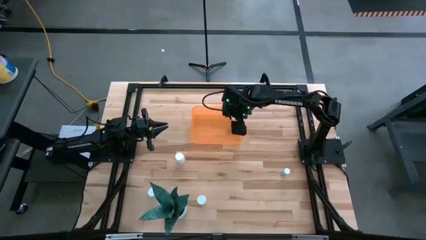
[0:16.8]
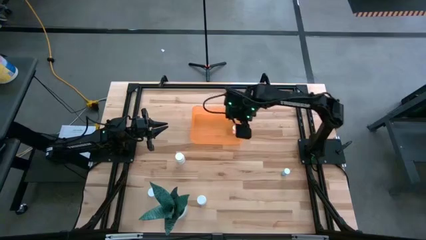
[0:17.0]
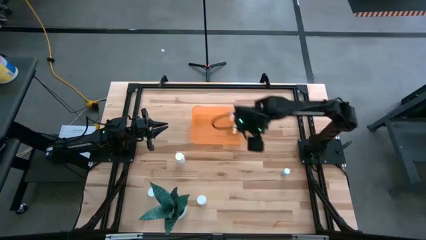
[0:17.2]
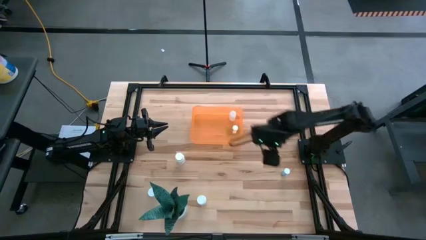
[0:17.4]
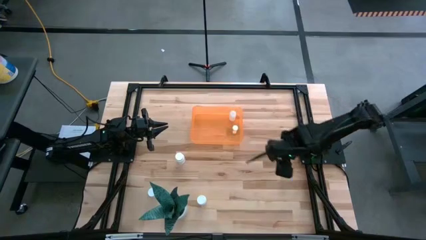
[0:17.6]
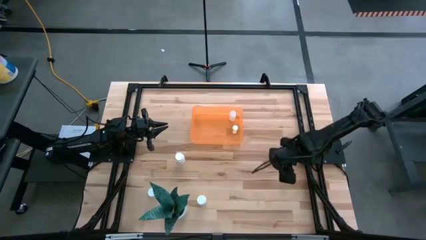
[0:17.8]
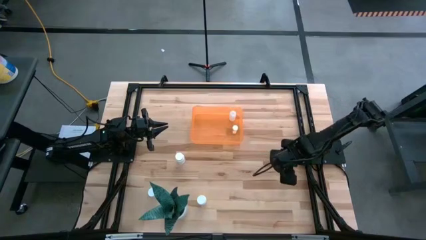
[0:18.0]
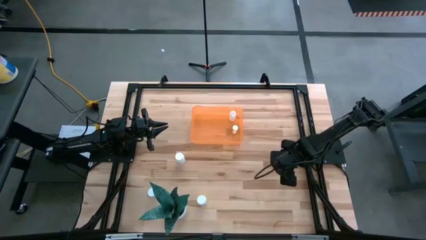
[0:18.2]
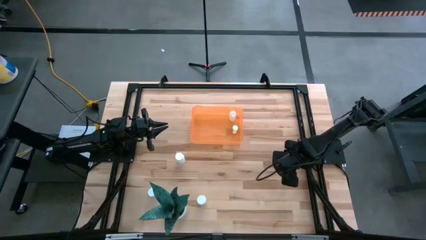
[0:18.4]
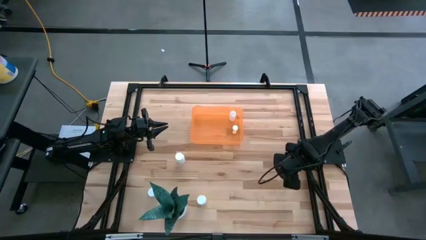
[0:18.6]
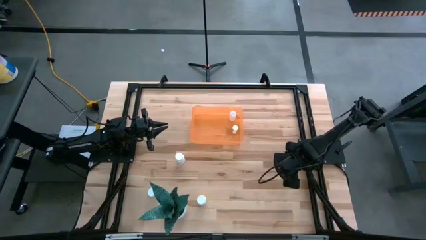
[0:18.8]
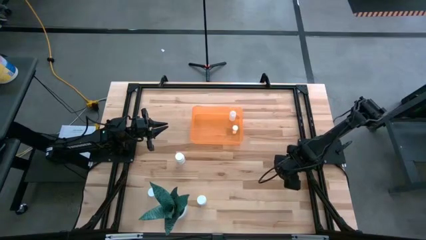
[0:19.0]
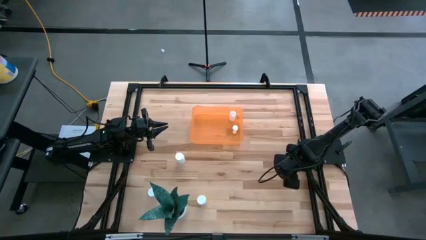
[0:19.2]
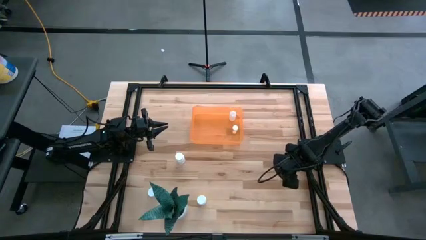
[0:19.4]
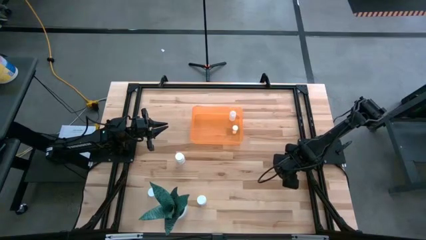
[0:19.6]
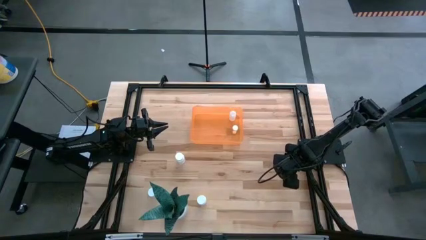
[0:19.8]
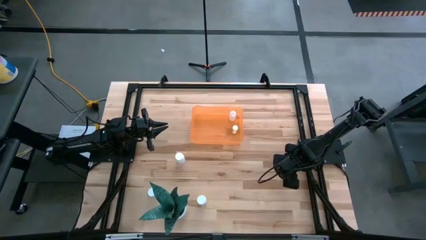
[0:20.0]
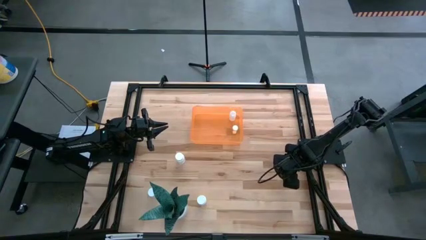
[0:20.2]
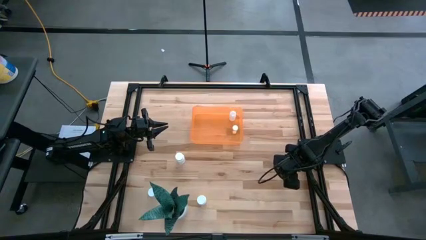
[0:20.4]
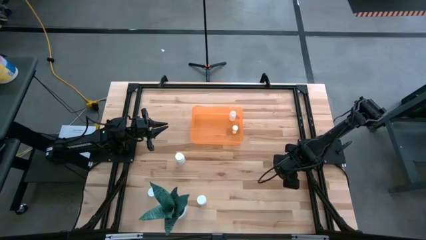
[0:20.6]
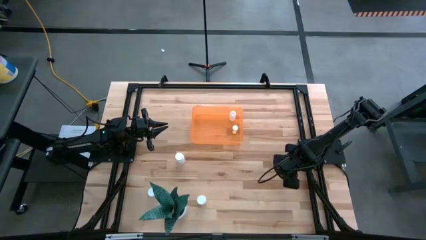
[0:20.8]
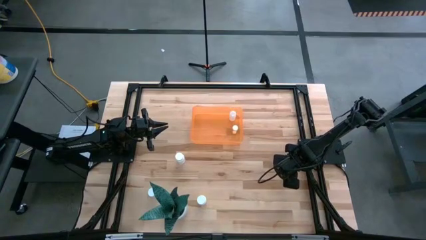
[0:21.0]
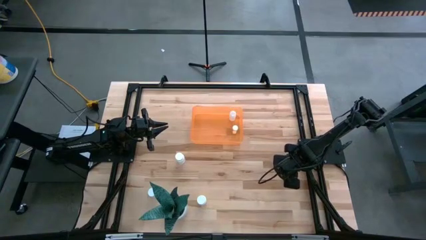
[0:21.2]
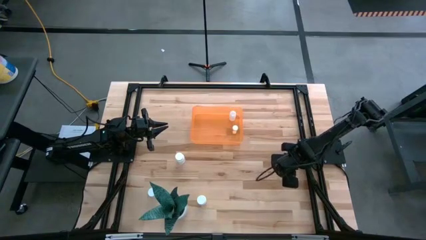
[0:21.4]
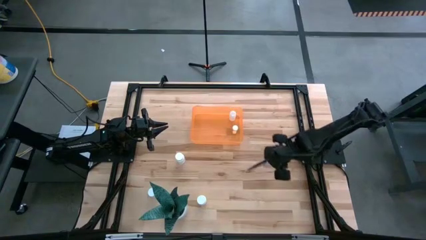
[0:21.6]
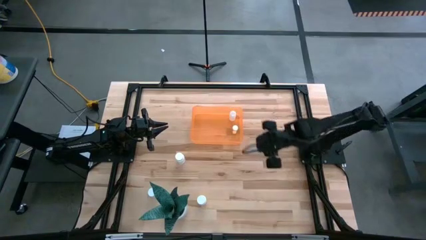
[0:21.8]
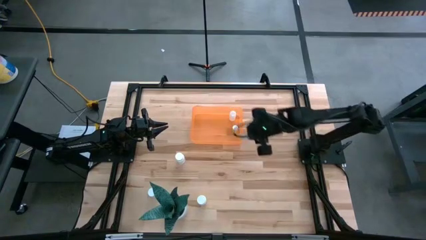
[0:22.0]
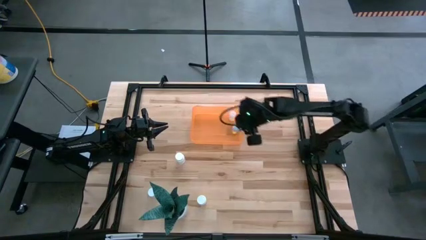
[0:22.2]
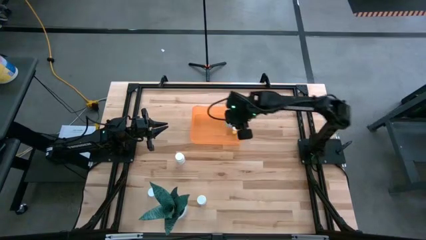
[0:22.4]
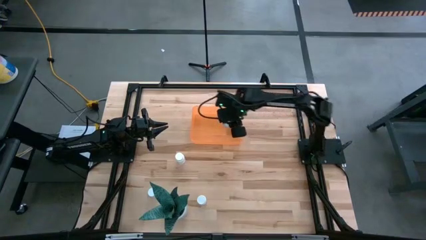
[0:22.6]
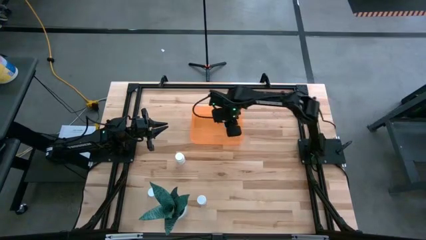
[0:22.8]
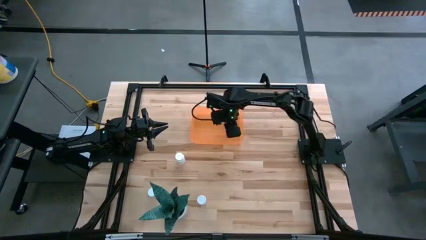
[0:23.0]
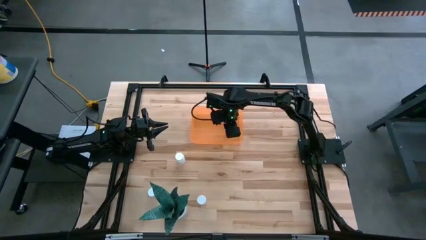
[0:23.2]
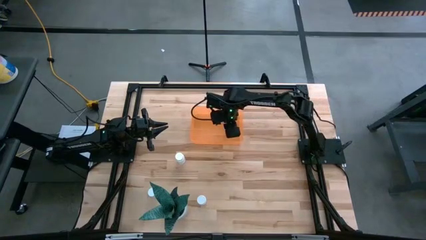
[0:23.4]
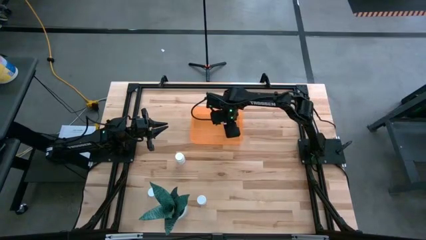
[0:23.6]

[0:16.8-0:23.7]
Task: Pick and place pill bottles into a basket
Put the blue pill bottle in the orange bin

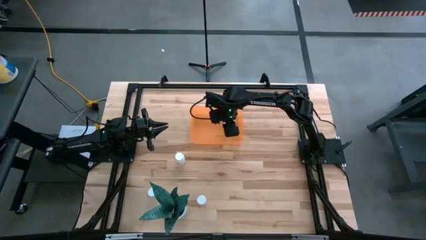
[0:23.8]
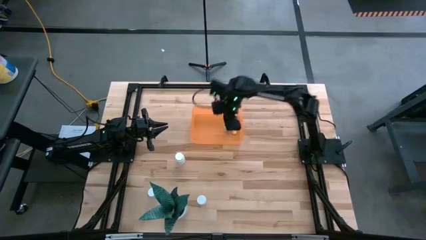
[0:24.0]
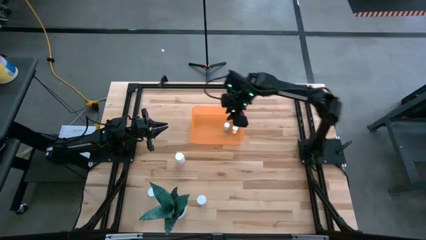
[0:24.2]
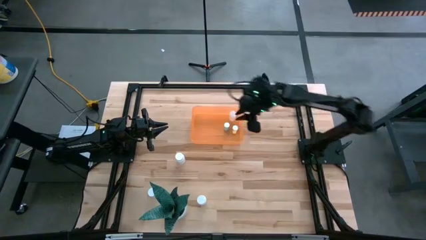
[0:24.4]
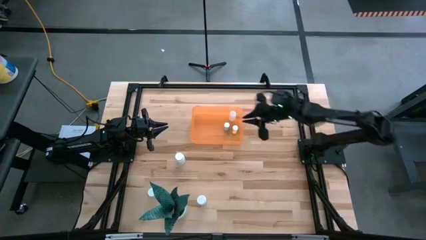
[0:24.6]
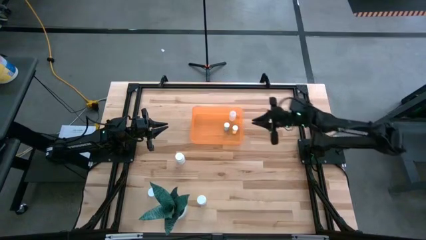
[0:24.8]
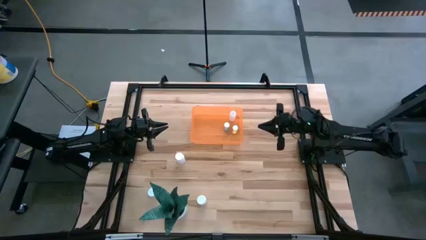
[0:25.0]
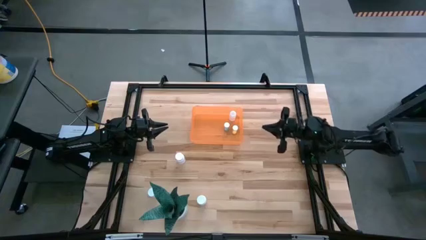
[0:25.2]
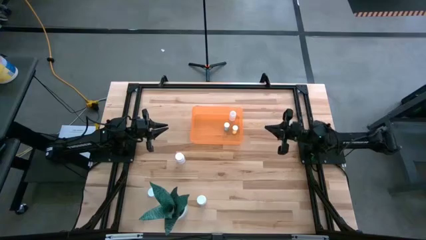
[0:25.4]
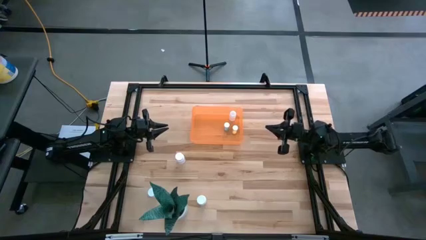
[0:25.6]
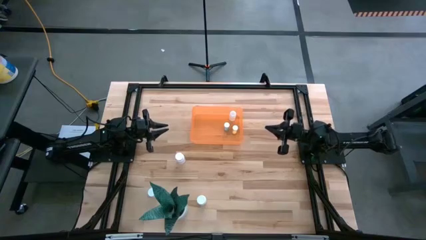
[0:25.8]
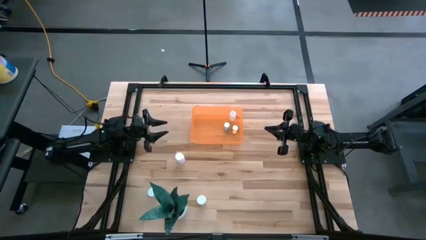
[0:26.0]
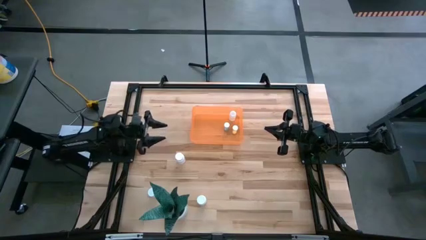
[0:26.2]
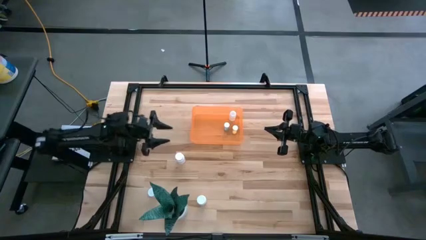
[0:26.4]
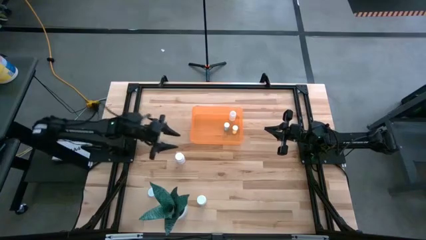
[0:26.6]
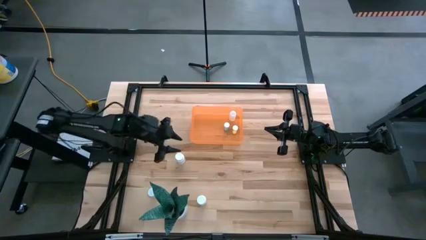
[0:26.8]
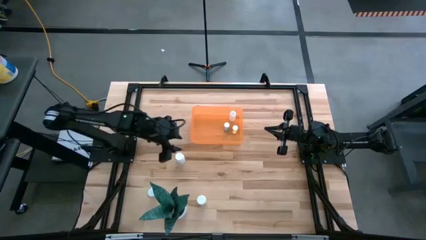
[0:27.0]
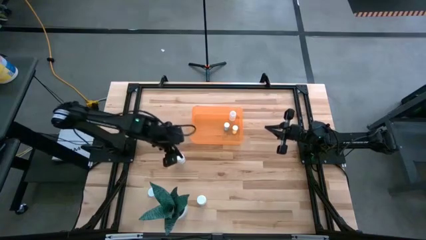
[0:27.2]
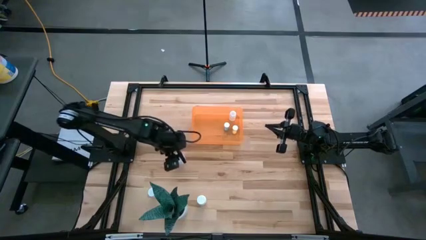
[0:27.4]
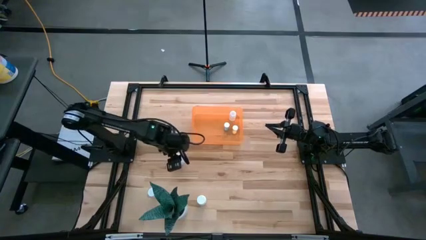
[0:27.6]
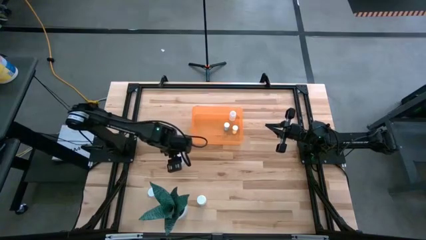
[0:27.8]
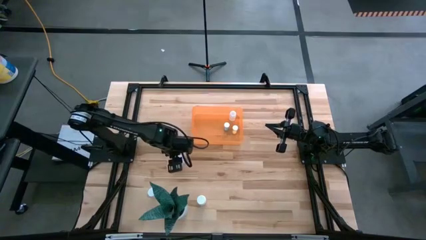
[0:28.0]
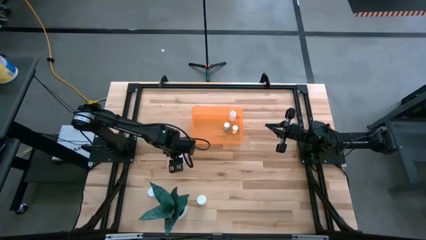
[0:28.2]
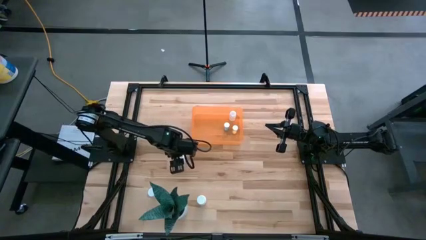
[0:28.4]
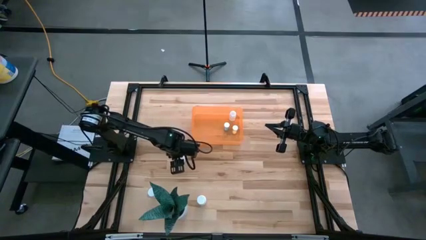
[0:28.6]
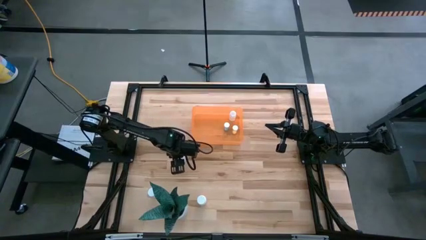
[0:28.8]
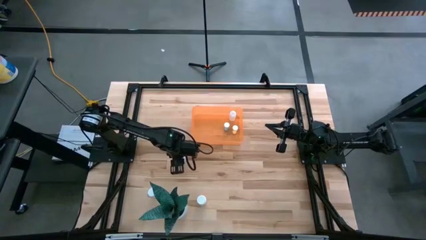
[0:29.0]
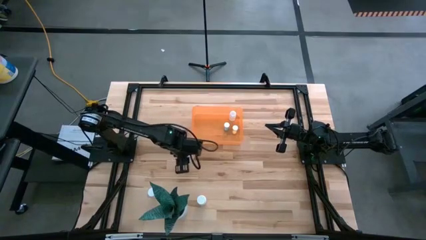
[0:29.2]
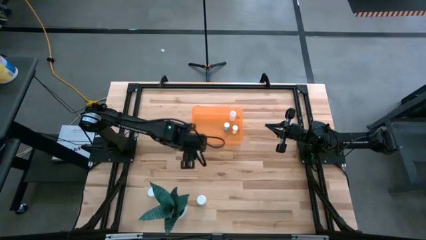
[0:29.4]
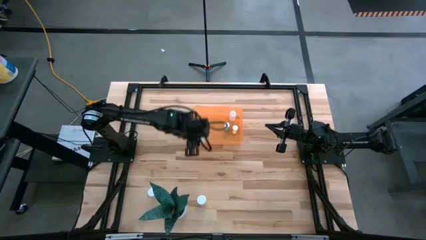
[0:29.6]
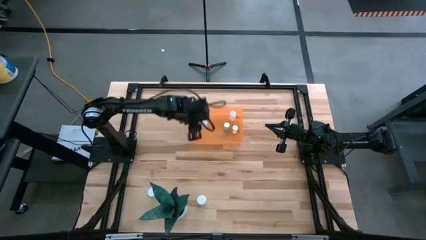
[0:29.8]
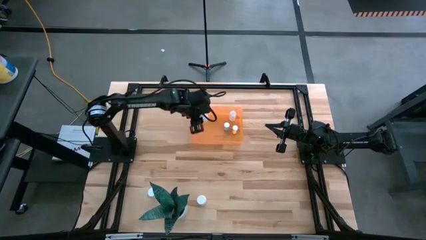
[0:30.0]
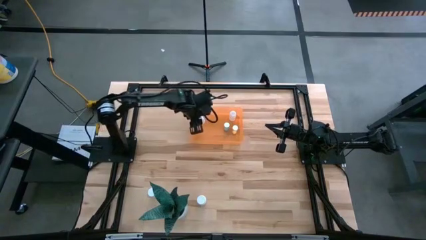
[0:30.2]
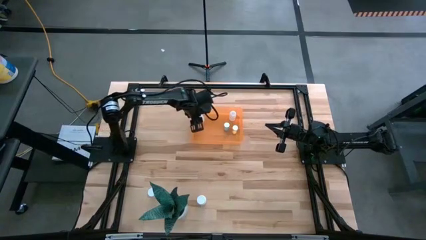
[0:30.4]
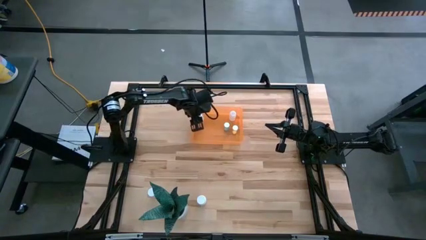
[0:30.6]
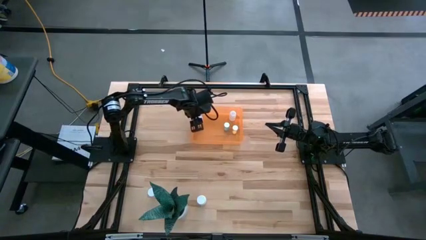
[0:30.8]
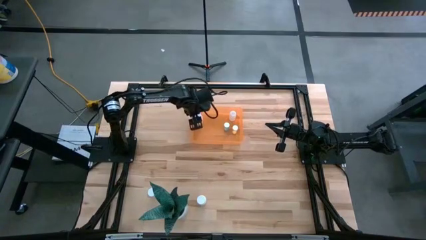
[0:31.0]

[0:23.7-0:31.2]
Put the top white pill bottle in the orange bin

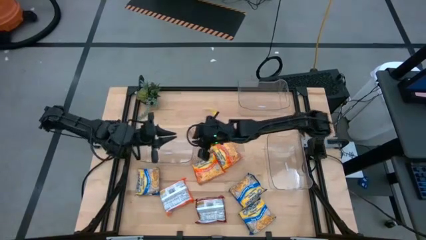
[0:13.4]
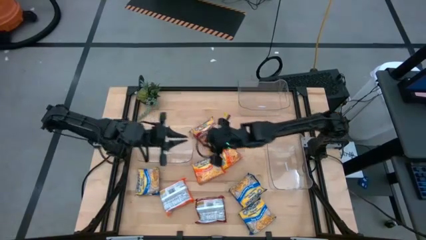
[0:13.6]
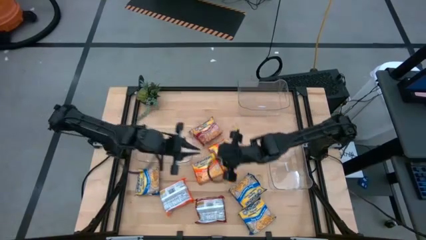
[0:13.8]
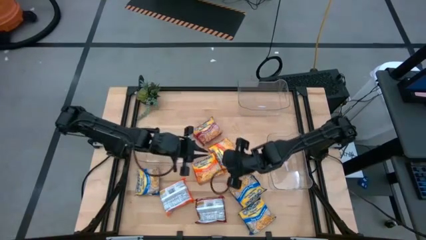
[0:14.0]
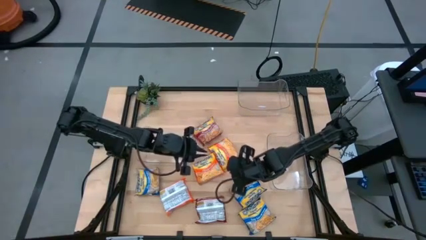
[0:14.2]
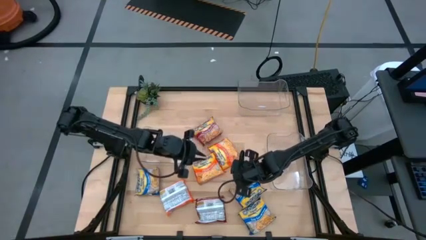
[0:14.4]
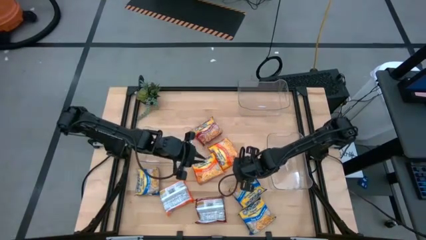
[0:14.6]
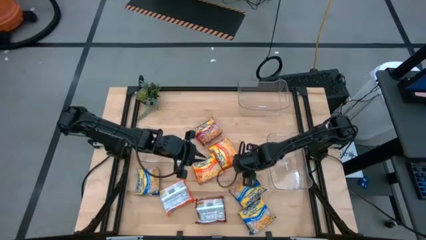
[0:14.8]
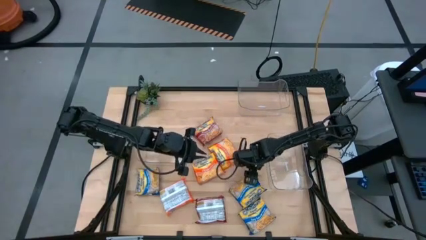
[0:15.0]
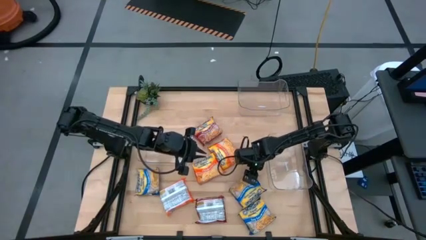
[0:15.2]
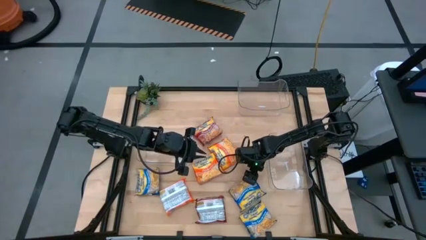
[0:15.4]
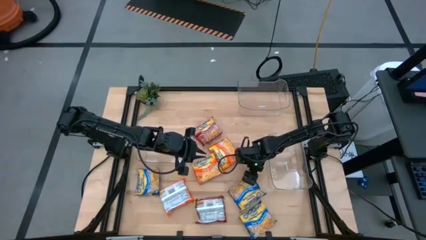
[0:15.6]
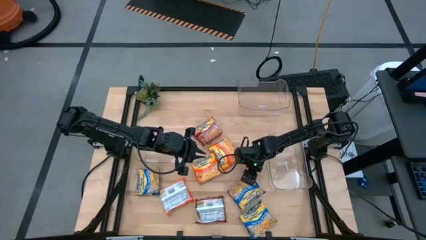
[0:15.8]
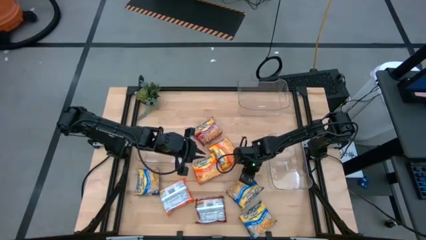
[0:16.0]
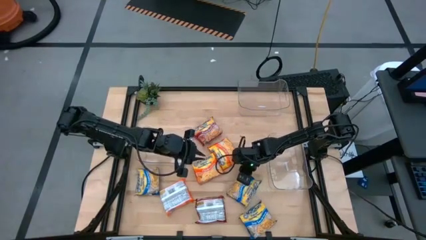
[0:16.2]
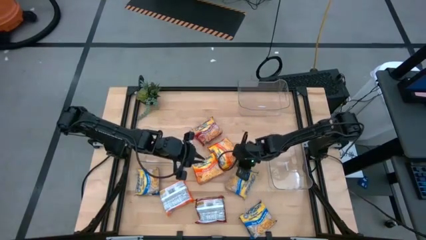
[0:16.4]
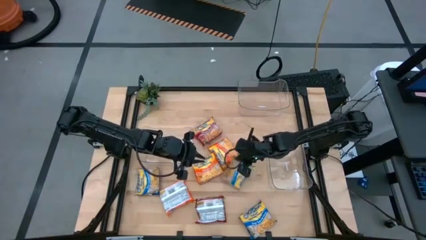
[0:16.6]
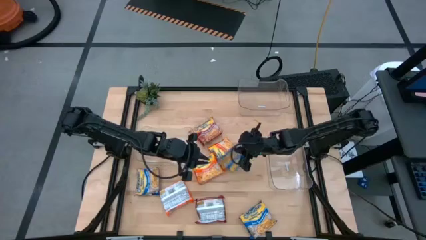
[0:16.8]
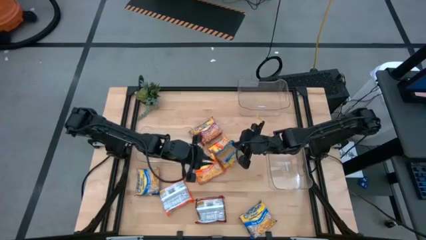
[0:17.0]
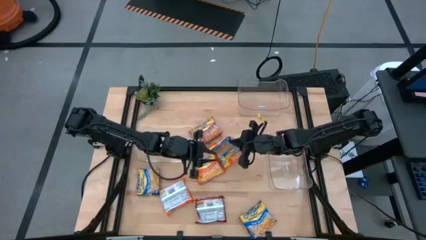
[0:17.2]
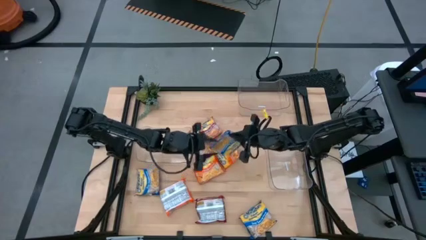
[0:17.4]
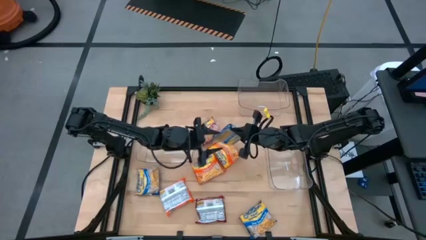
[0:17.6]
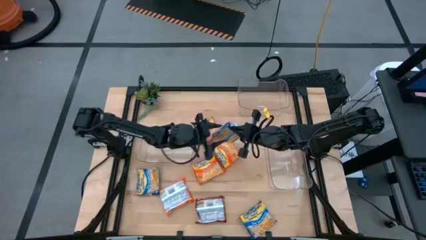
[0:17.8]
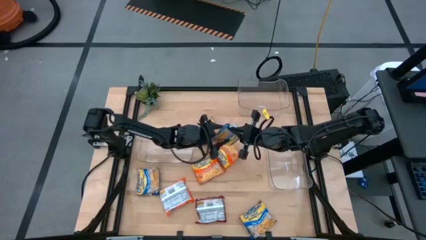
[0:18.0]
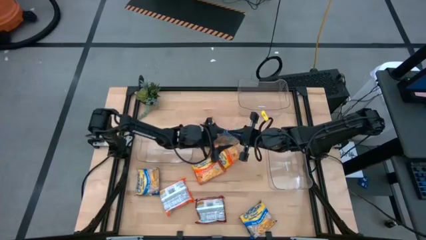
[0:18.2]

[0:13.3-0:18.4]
Task: Sort Maruchan noodles
Put the top right blue noodle pack into the bottom left transparent bin
